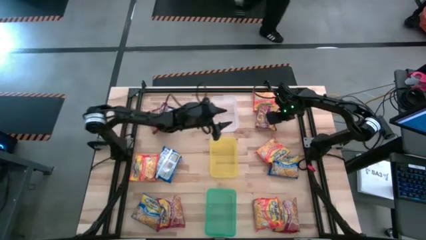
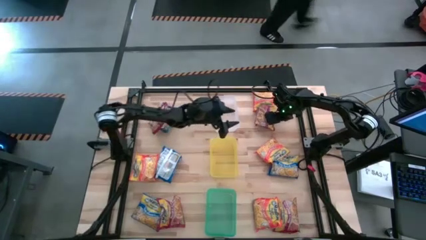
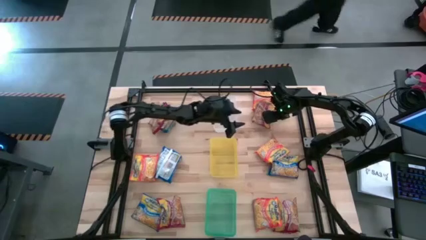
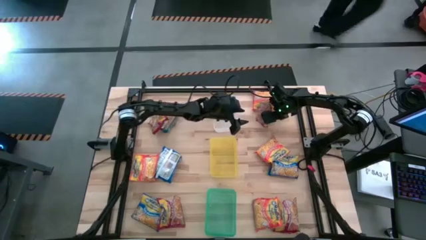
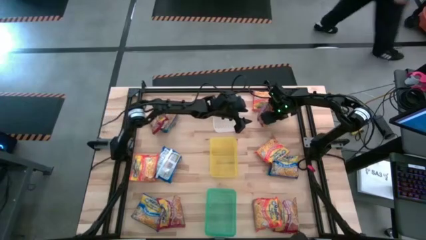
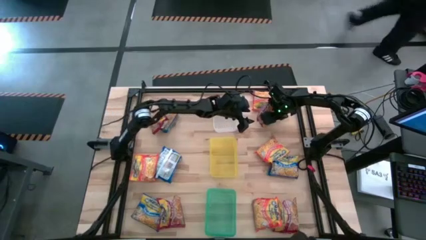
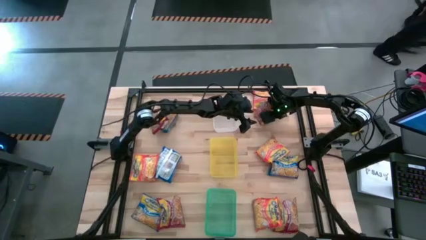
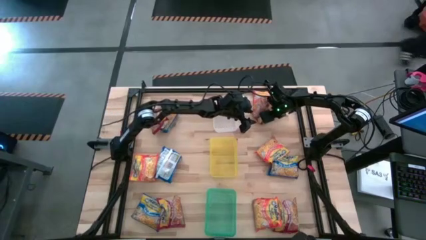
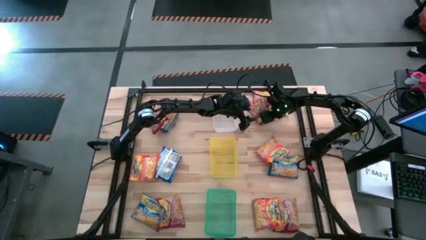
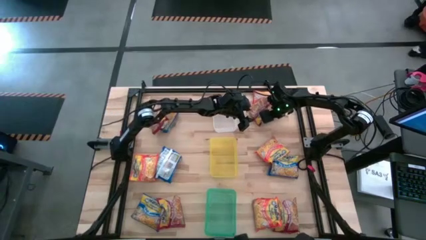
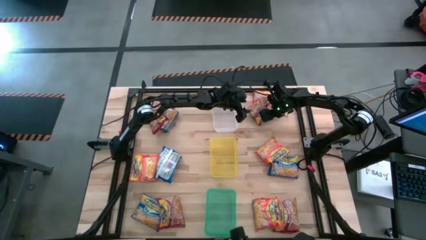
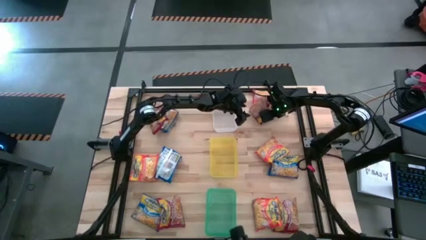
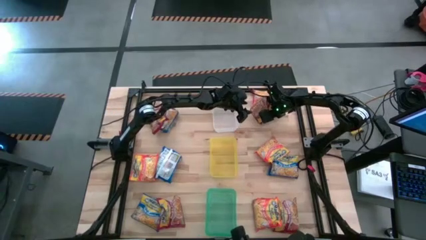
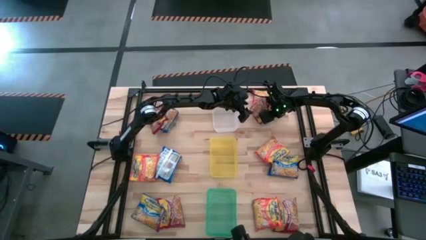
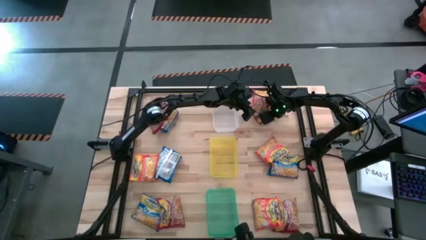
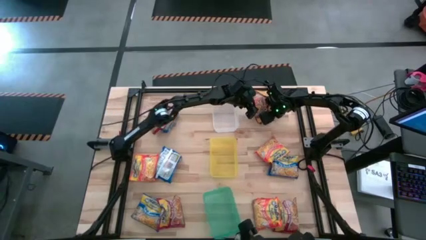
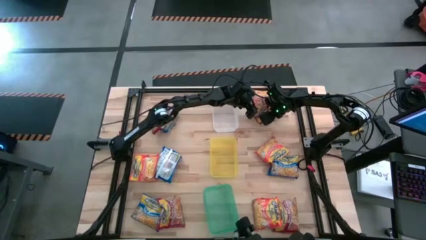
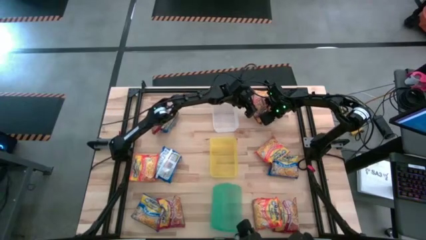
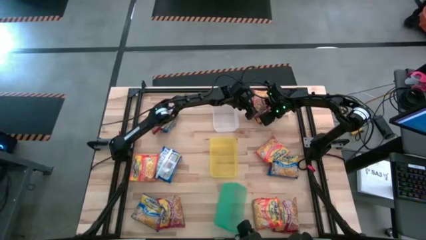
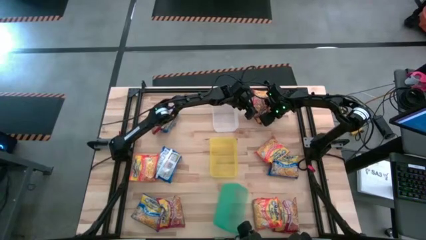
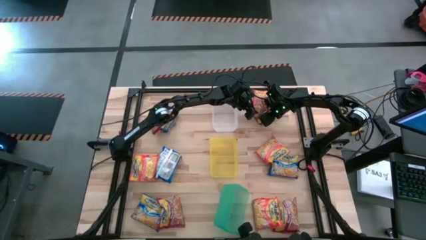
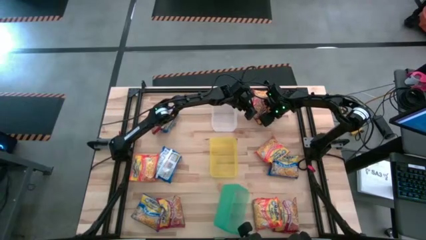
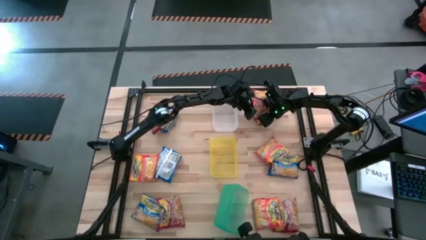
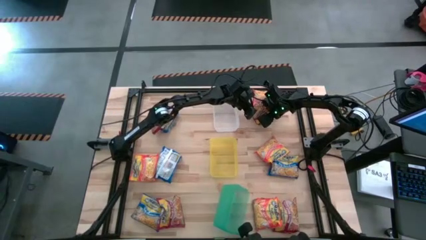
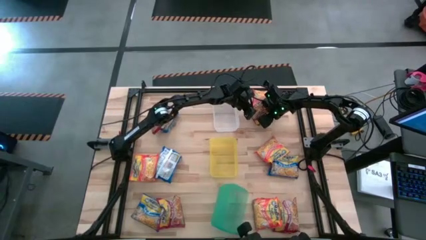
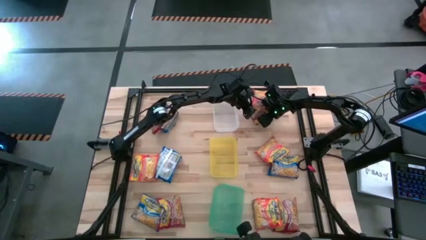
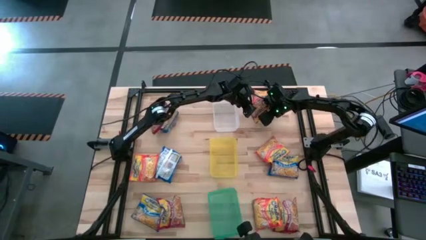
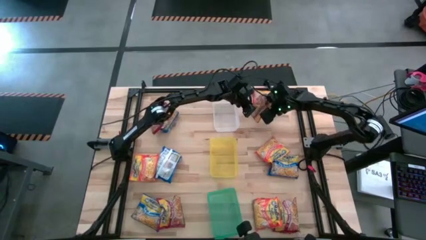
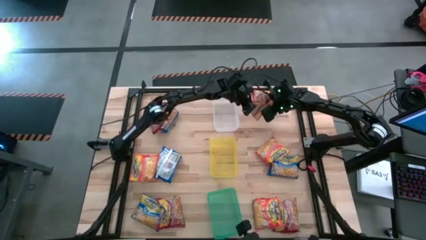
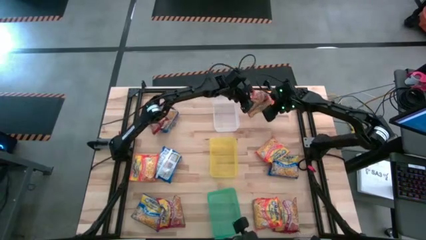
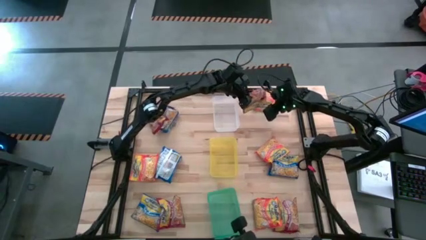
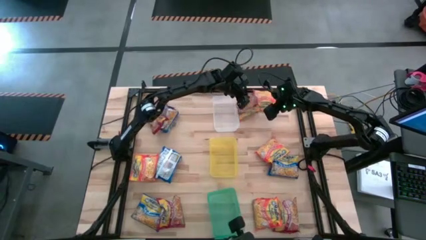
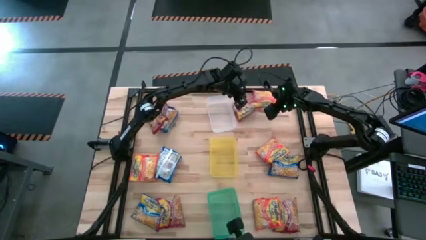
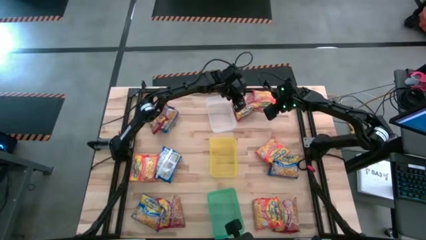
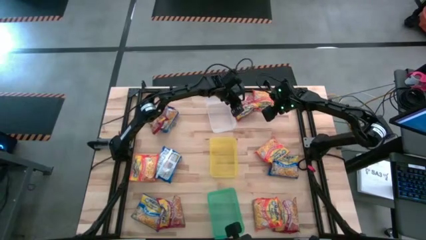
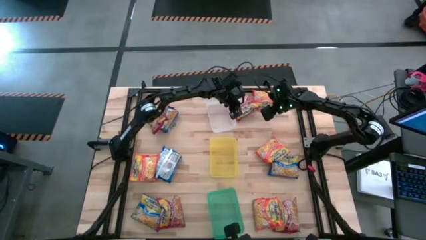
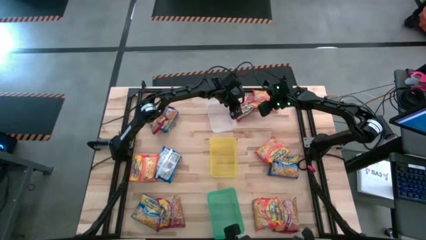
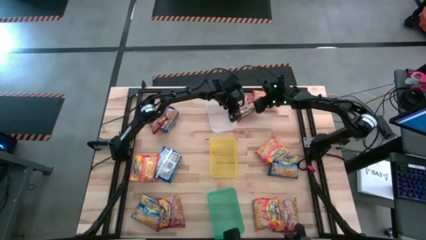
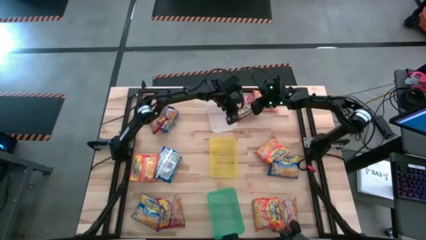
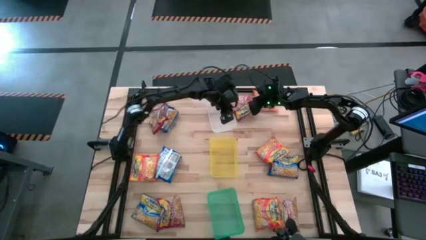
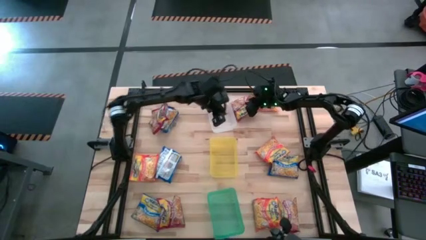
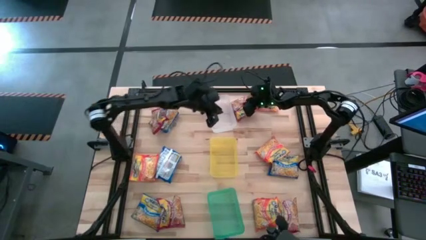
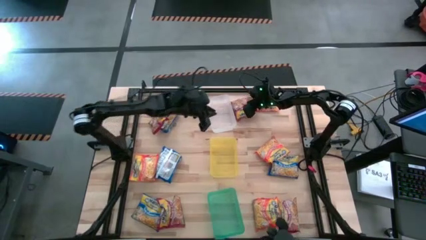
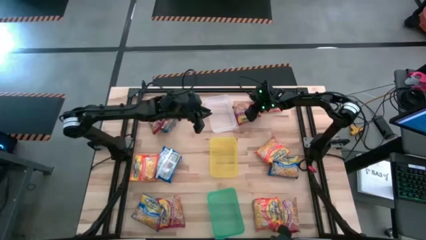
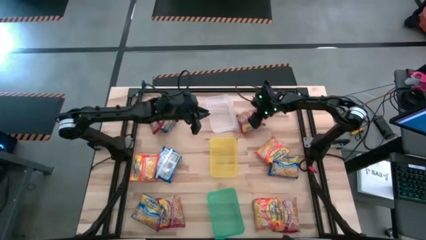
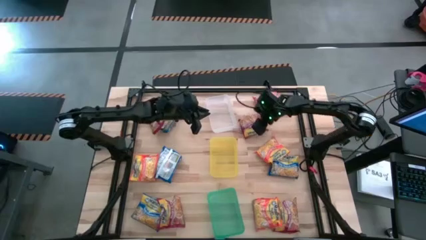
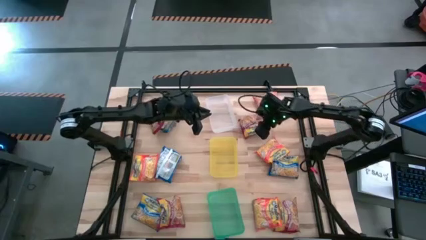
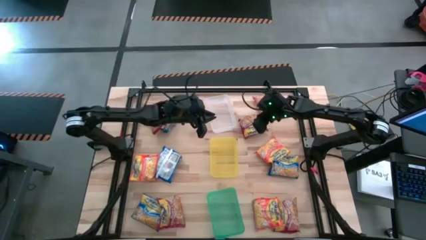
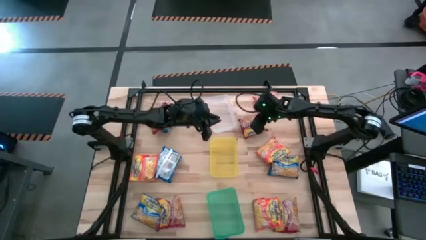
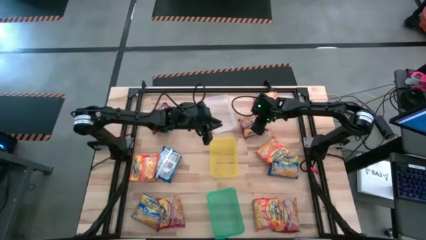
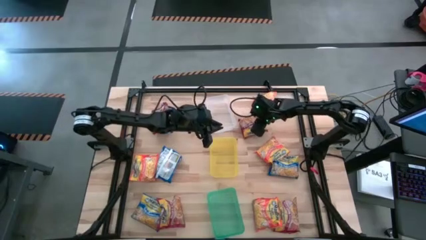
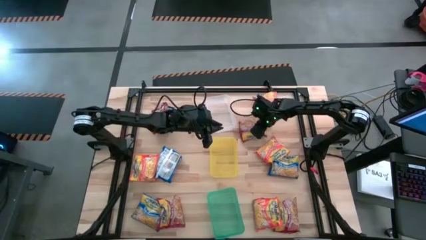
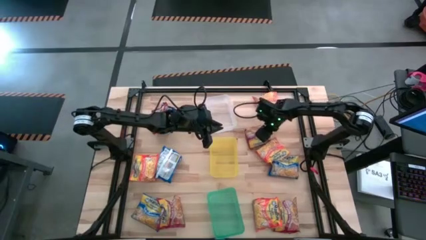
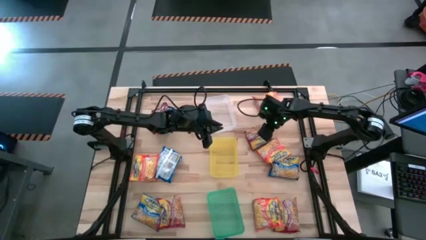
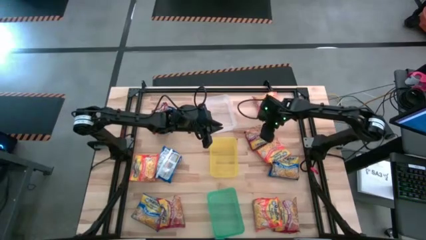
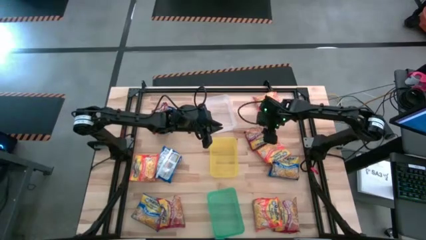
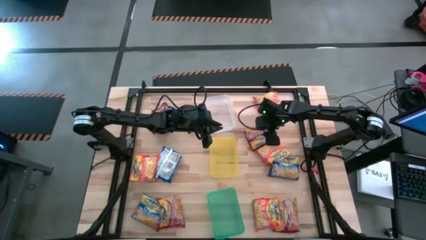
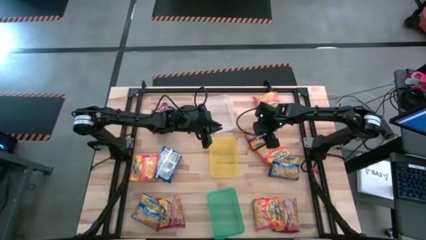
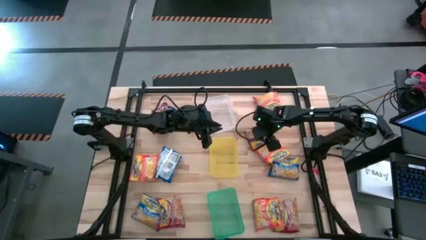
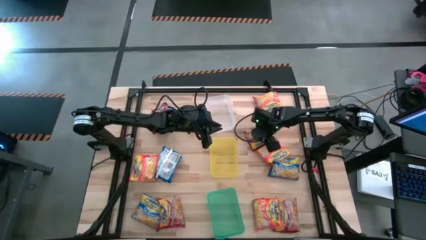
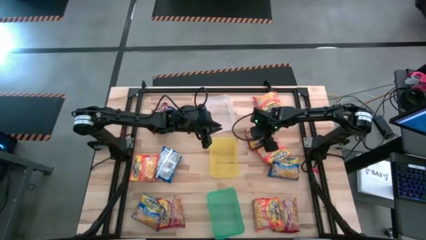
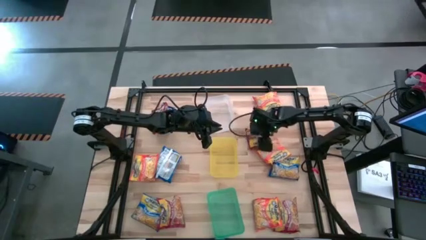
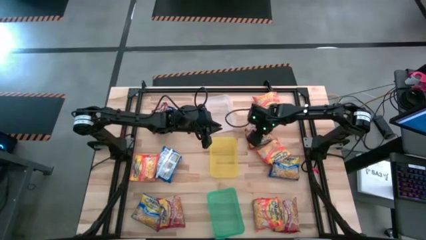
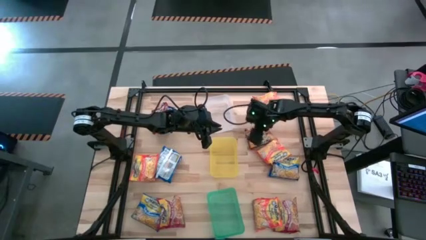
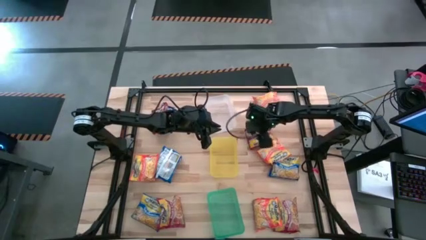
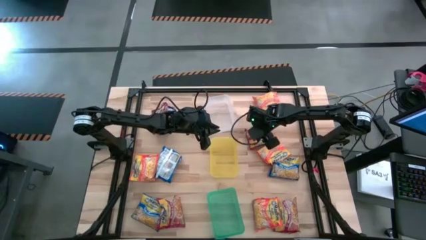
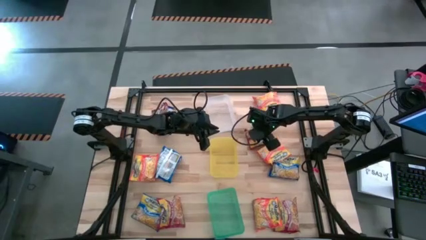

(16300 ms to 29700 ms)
Task: Sort Maruchan noodles
Put the red noodle pack into the transparent bin
